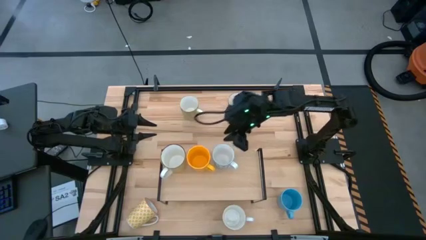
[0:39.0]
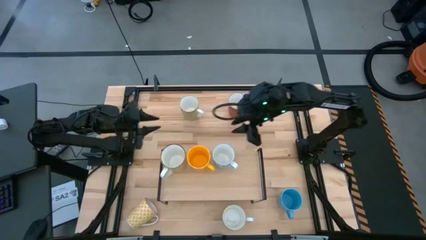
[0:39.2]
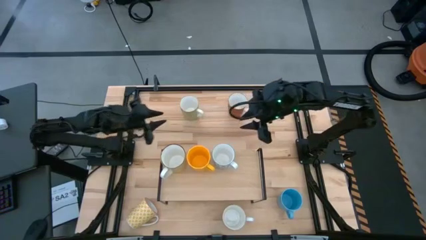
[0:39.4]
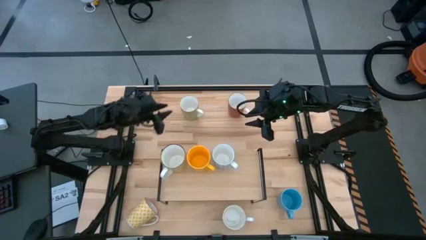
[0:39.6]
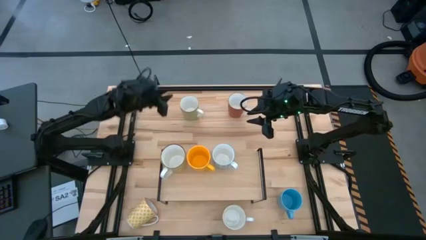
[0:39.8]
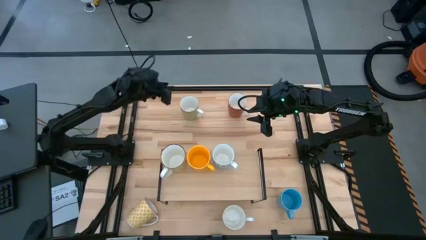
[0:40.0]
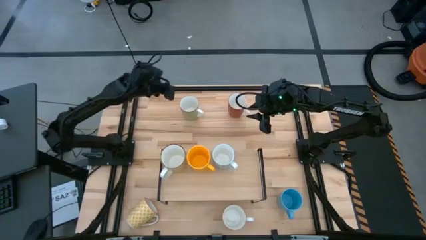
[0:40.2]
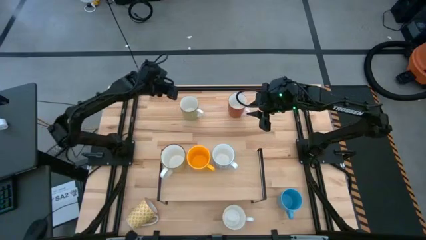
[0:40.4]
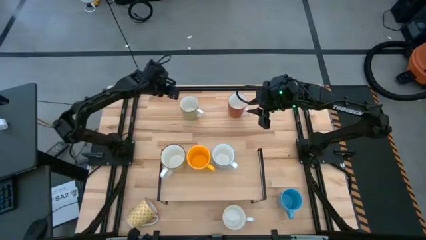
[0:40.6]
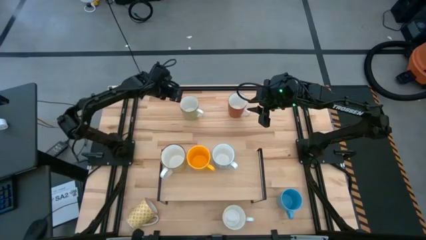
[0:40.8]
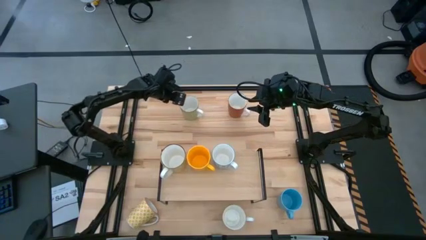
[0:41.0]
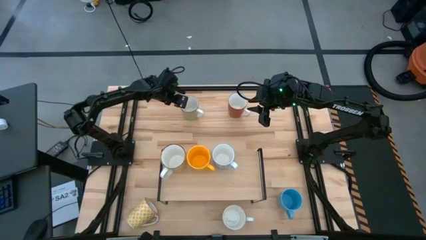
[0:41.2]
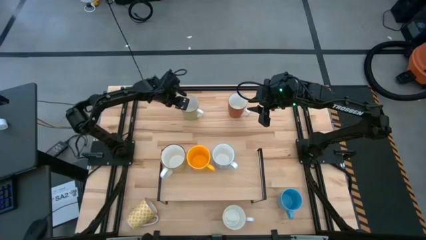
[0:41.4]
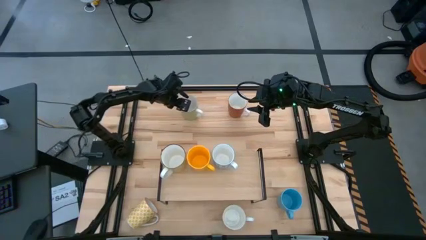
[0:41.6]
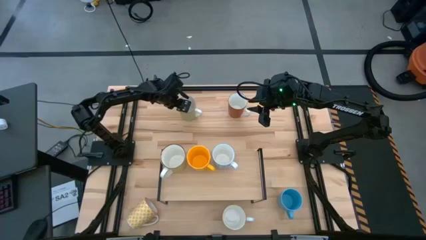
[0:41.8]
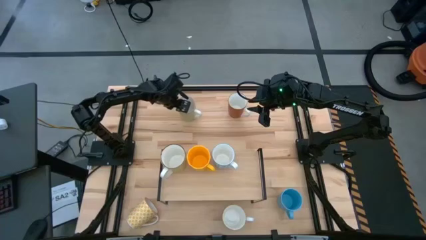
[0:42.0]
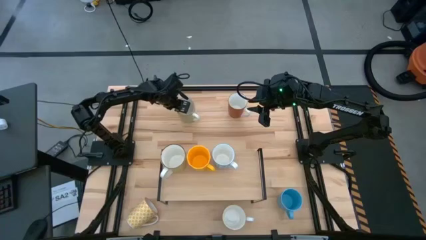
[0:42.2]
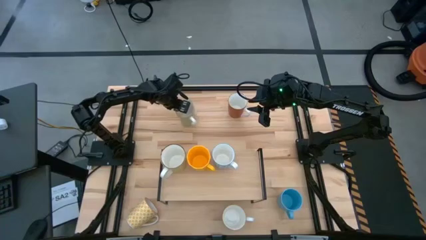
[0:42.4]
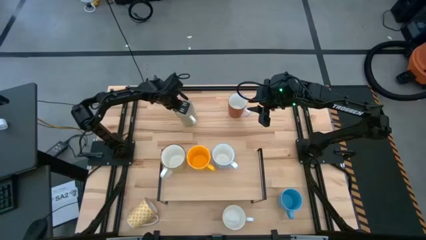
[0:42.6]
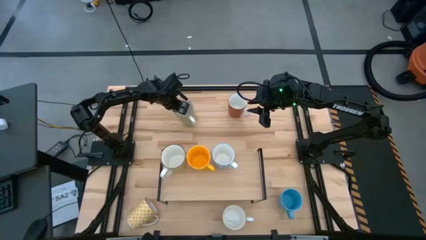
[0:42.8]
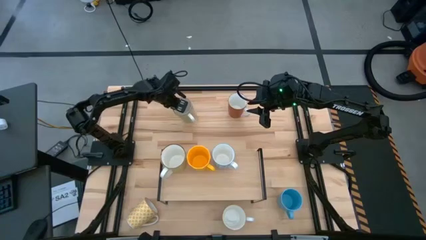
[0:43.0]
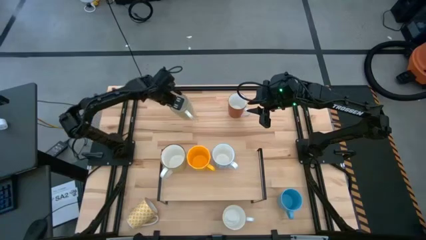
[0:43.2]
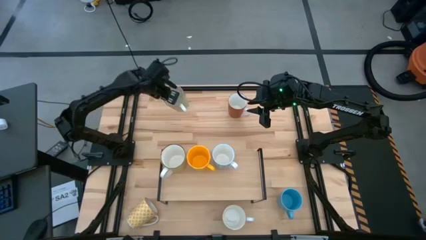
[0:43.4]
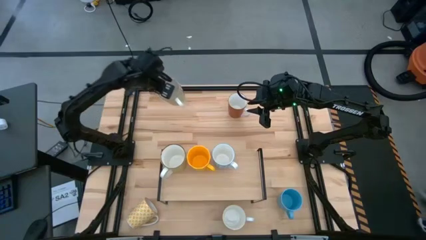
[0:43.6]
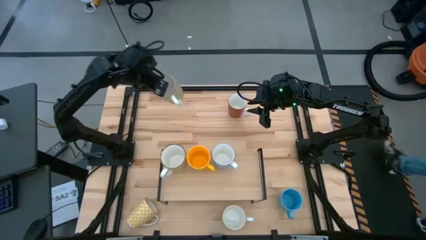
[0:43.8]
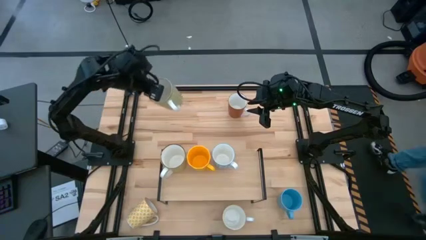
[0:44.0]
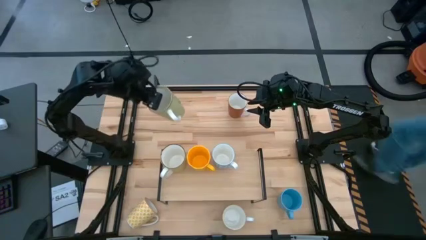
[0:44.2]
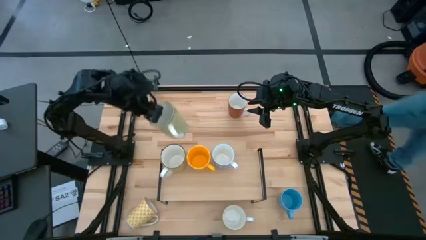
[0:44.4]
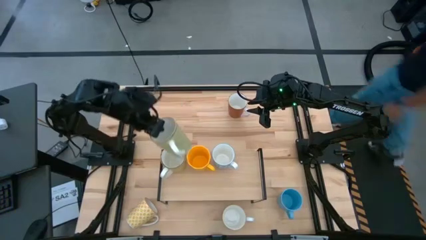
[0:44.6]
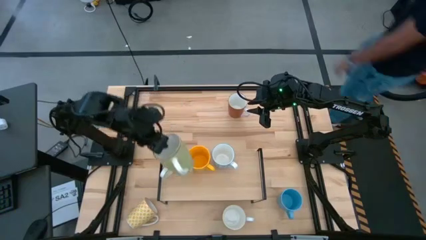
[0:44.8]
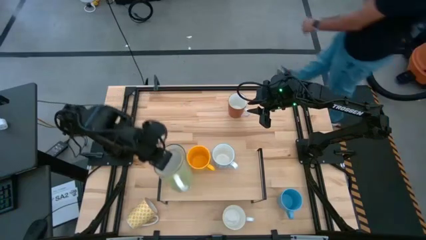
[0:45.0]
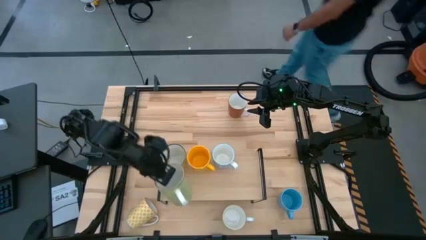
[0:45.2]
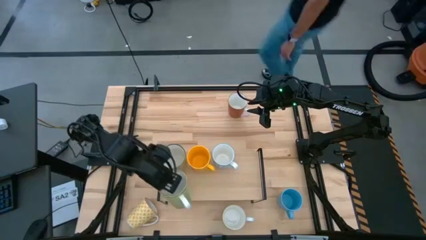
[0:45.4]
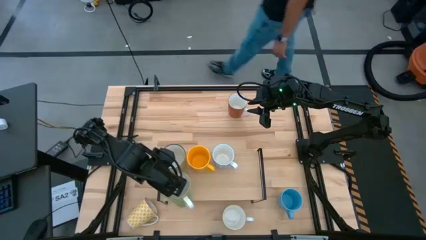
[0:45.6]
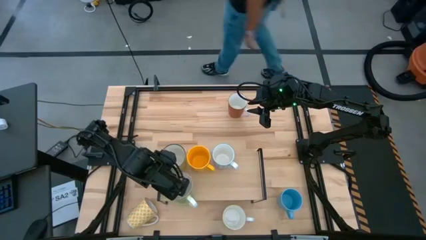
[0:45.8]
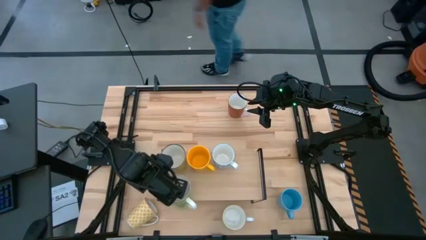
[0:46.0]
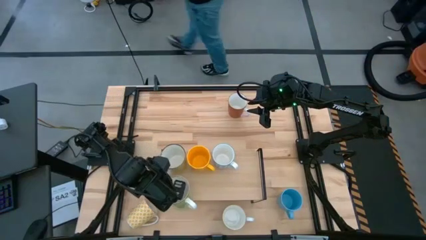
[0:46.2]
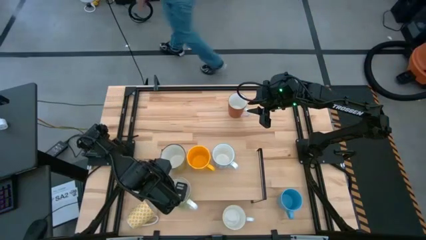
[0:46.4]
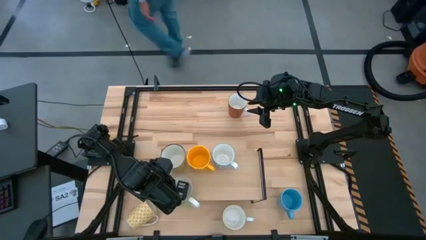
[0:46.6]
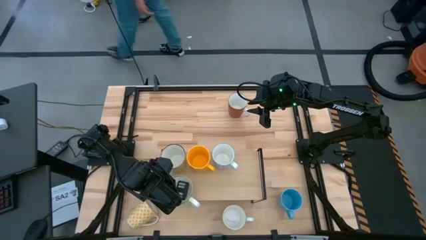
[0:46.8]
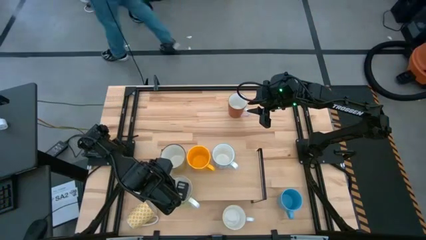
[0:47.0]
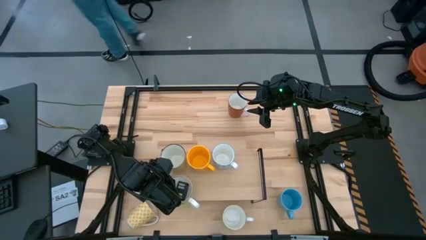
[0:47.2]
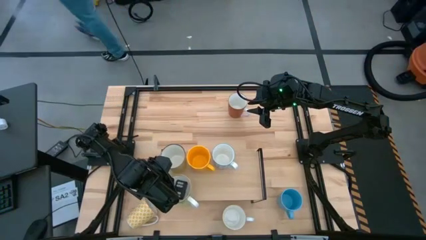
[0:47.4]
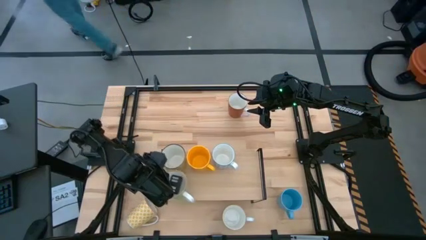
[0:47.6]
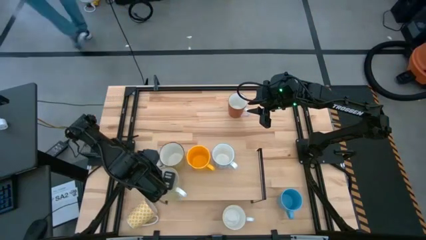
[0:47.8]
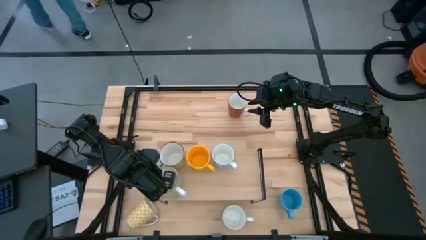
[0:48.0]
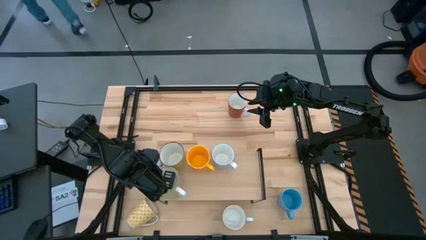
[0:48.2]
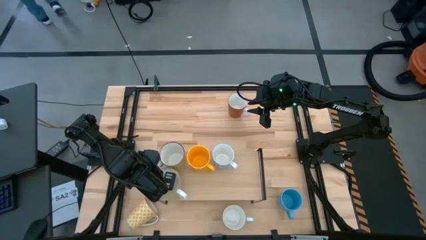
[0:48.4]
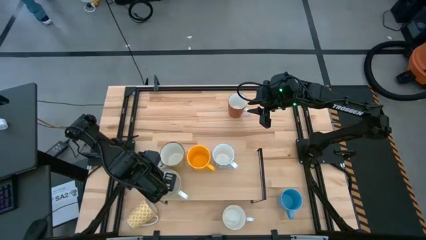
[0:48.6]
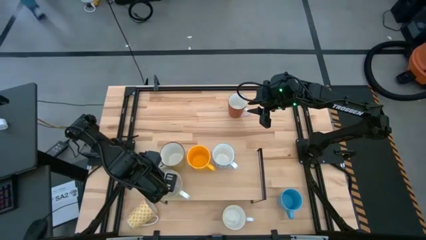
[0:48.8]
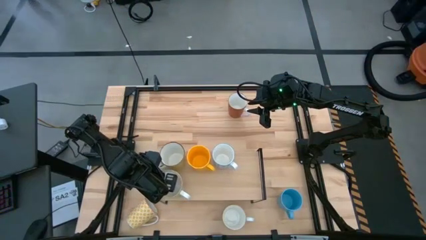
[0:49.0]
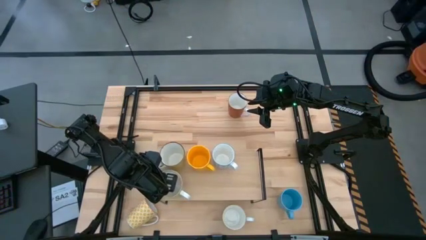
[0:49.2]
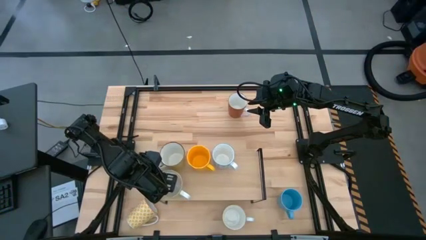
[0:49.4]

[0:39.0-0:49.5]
Task: Place coffee mugs
Put the green mug on the shelf

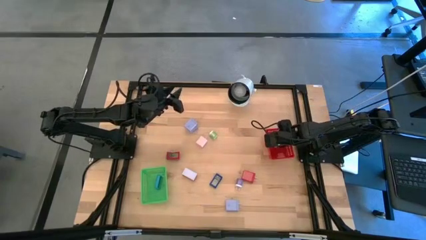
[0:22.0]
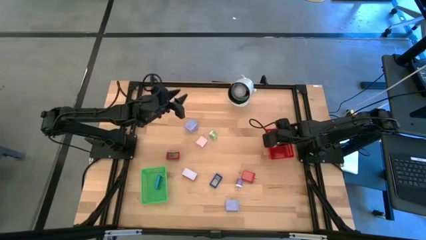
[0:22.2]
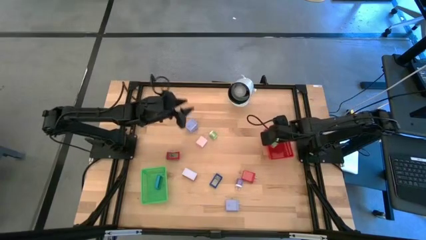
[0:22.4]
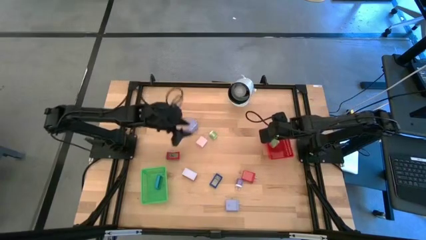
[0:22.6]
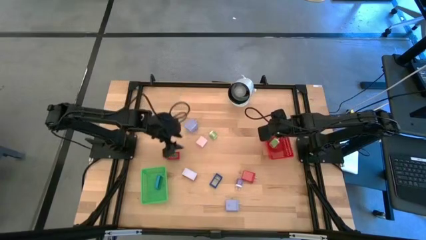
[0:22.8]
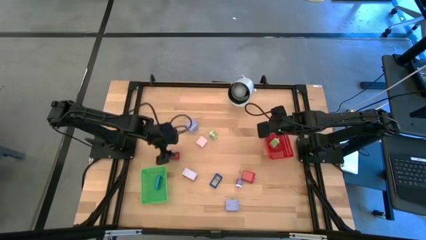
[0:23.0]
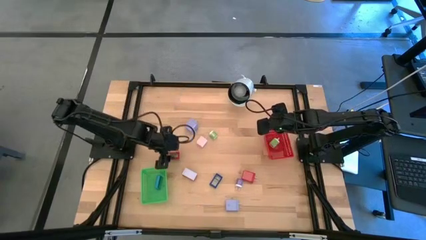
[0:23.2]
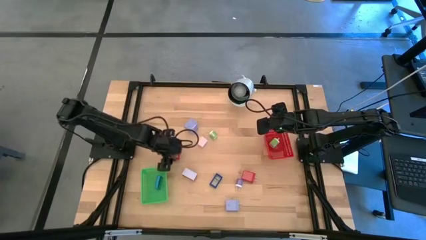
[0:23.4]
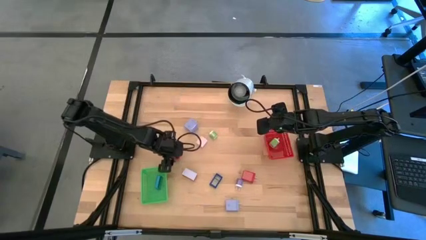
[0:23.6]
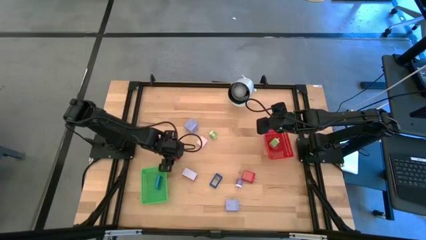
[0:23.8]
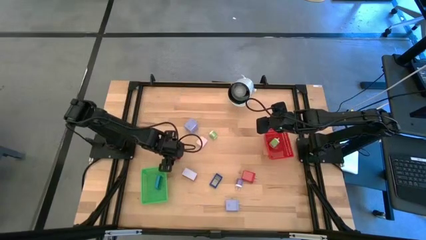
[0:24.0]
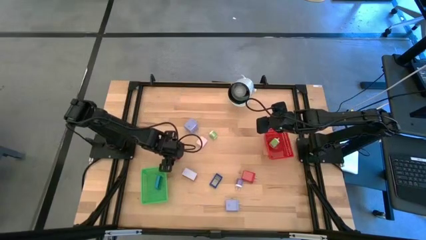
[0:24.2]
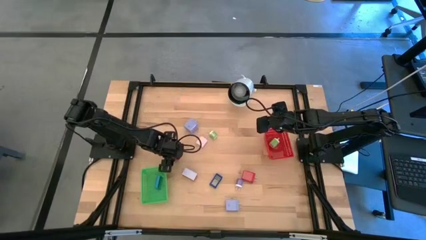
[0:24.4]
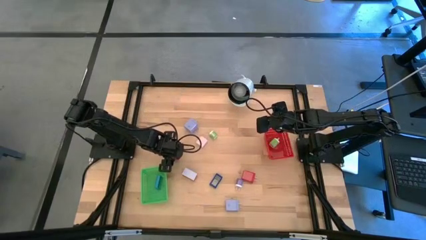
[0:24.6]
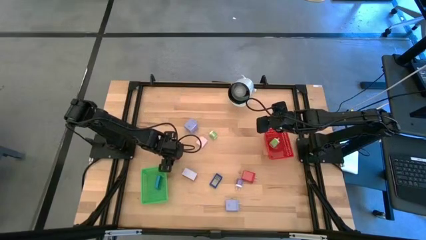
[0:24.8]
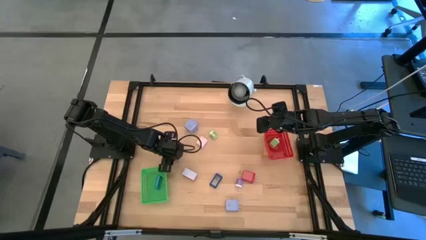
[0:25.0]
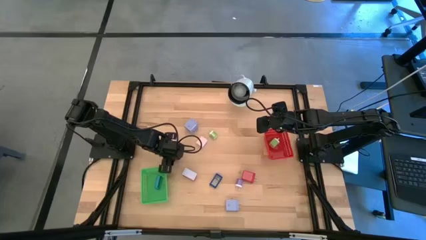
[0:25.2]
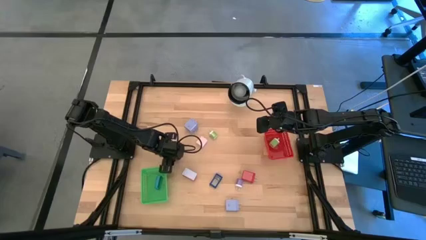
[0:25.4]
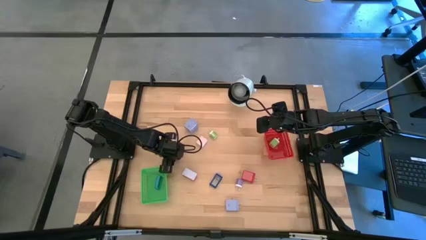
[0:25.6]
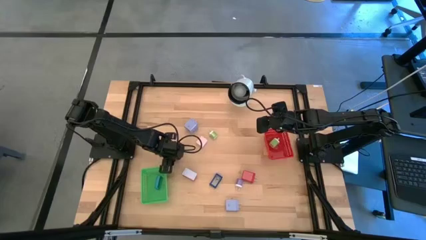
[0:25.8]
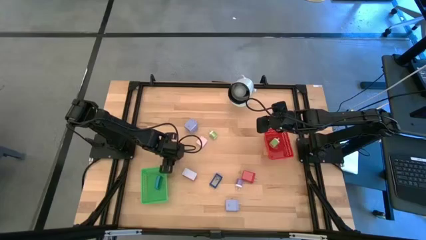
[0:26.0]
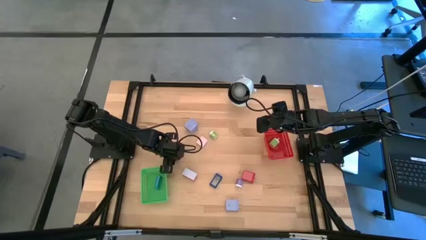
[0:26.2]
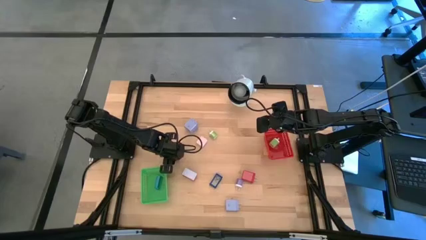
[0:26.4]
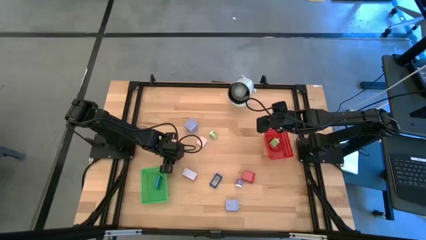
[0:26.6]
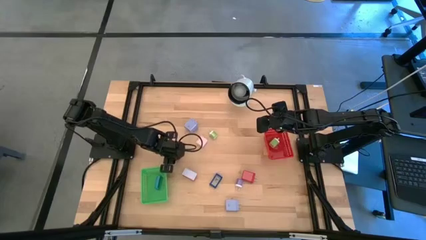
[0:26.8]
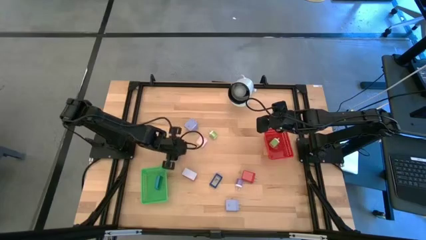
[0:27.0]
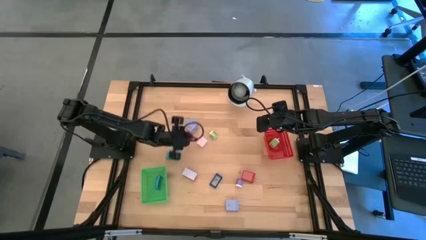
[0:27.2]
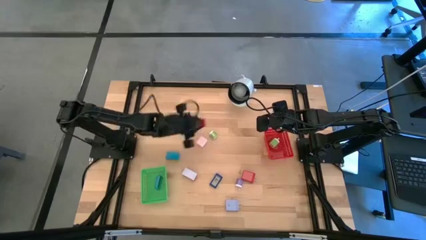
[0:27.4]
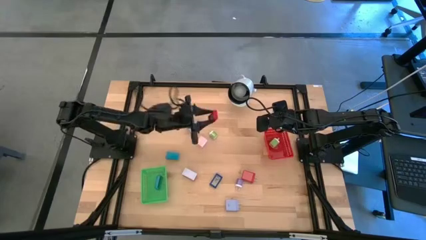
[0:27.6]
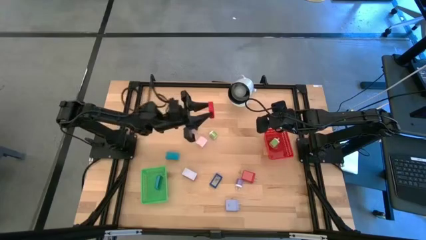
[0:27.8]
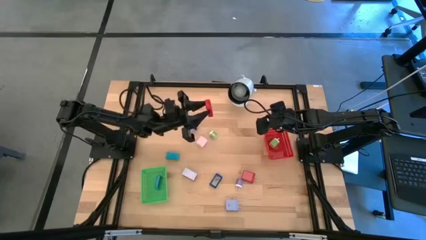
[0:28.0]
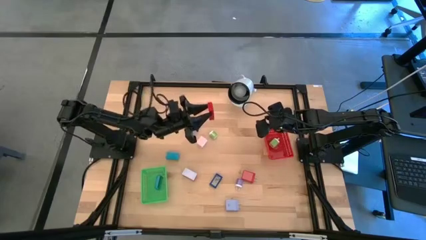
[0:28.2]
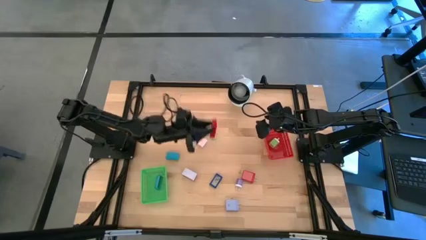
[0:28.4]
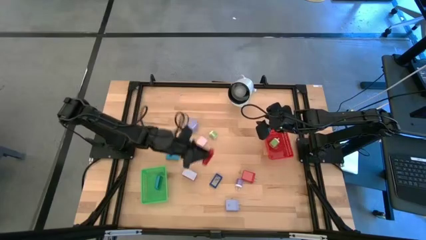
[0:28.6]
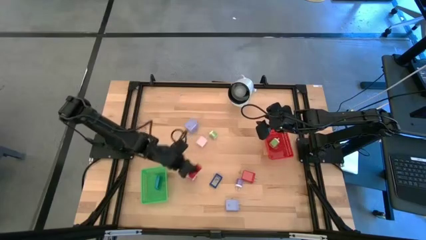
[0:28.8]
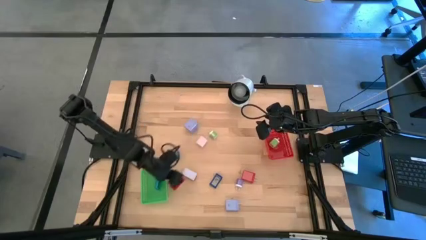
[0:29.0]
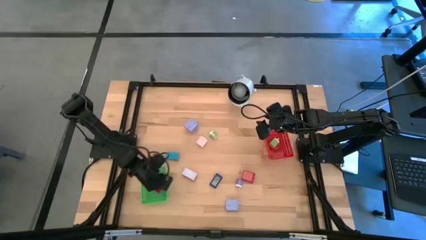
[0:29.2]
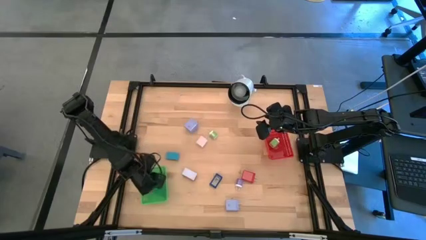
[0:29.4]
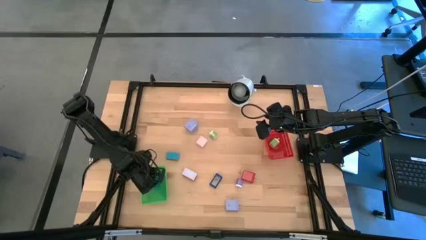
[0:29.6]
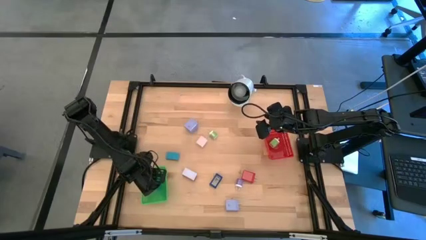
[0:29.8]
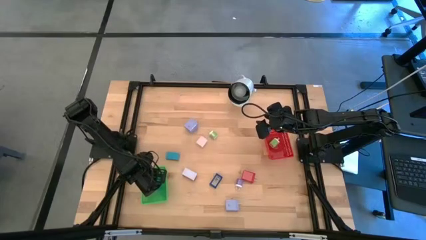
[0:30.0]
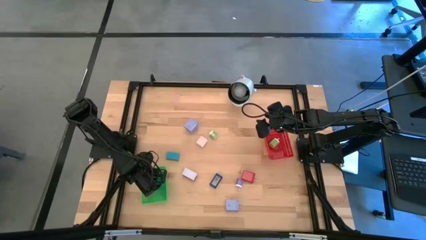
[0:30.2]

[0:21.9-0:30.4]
Task: Pick & Place Office items
Put the left red digital clock into the green bin
